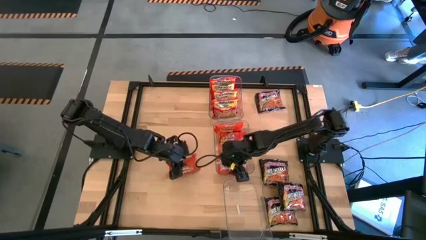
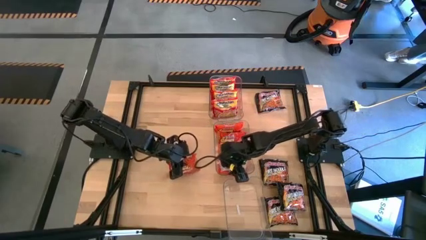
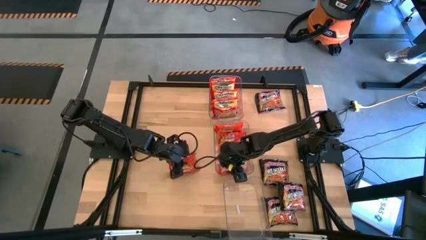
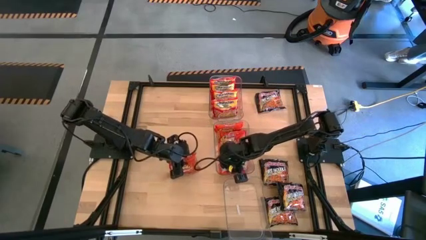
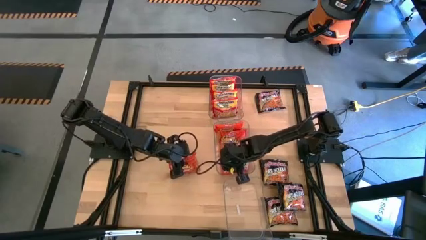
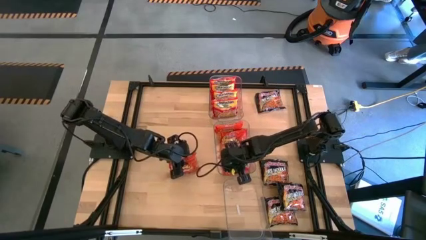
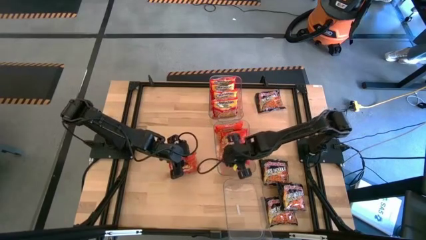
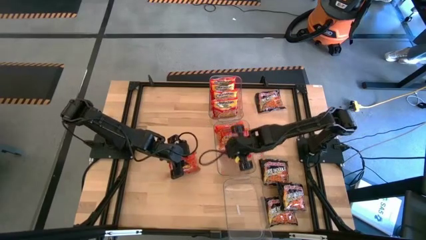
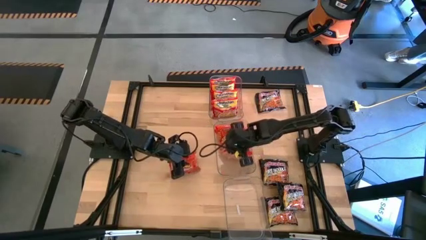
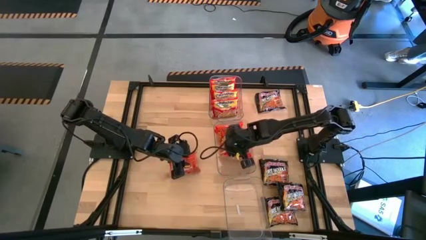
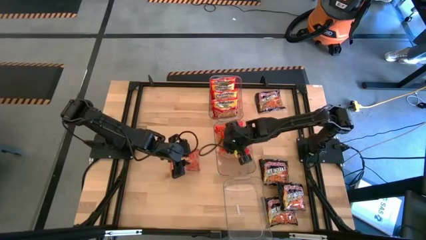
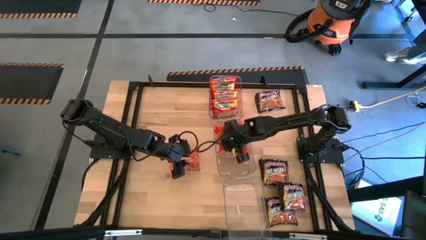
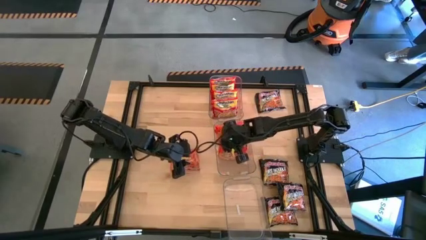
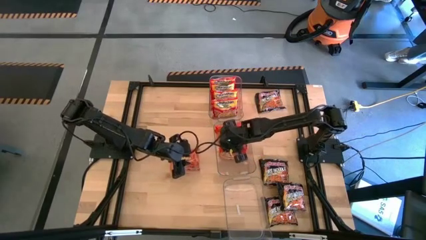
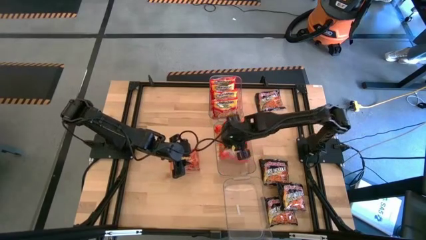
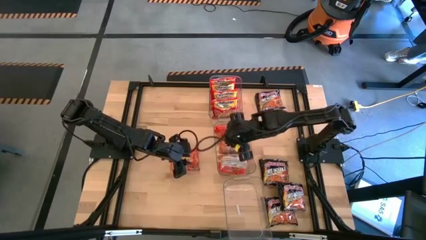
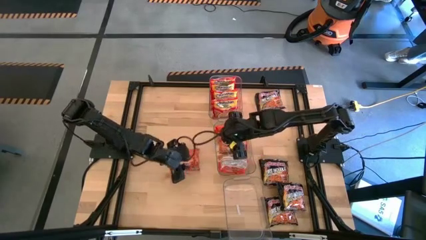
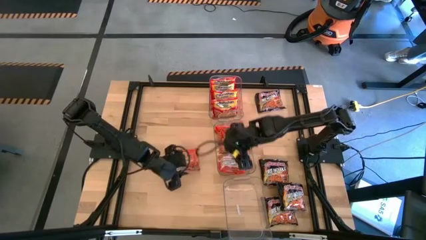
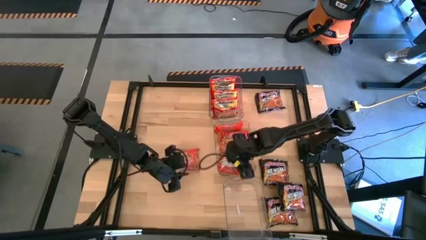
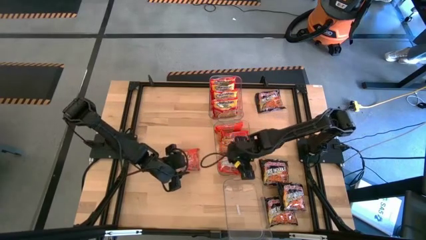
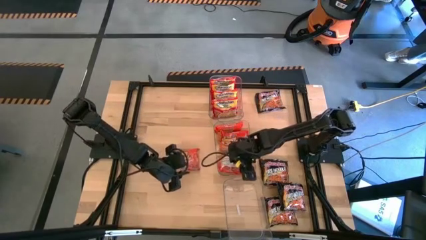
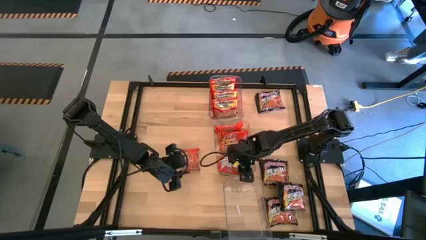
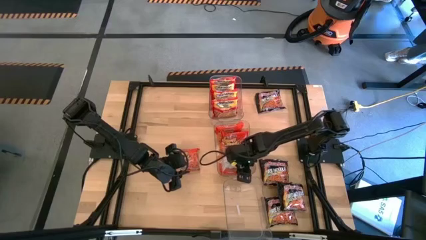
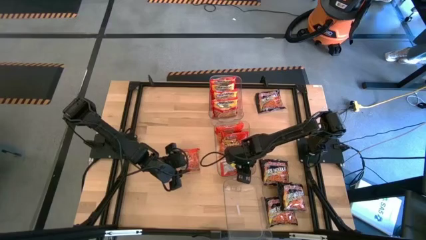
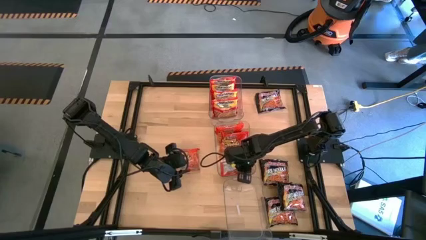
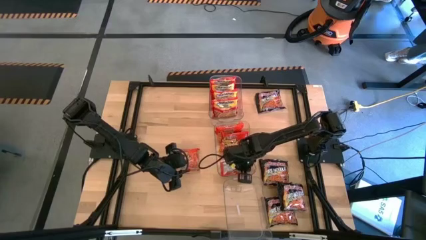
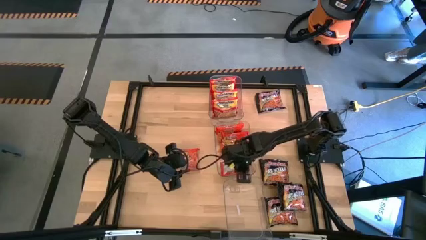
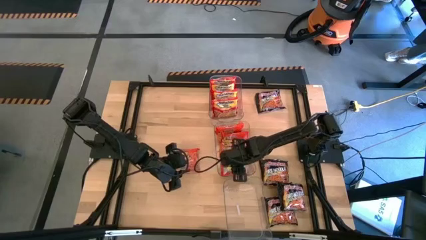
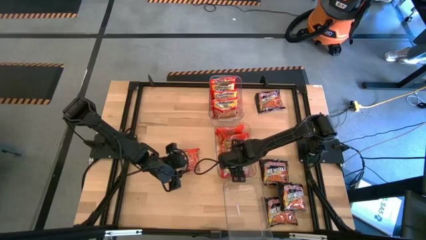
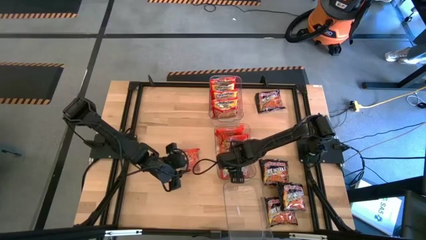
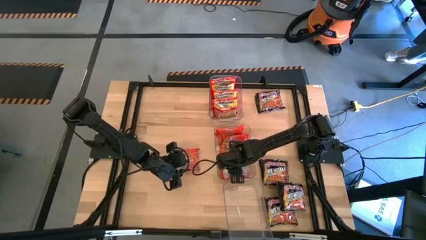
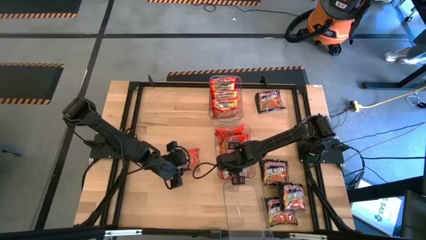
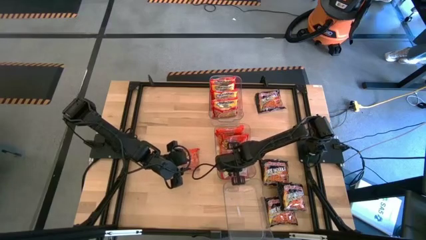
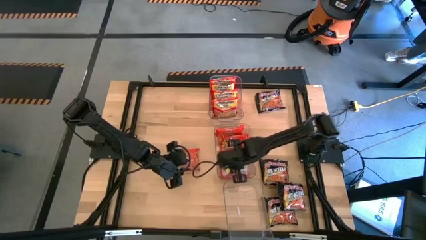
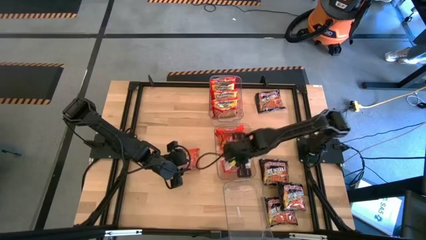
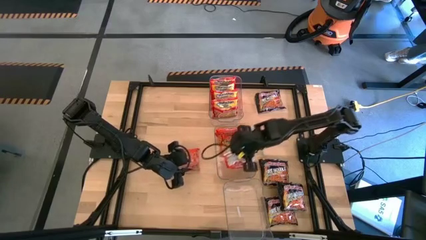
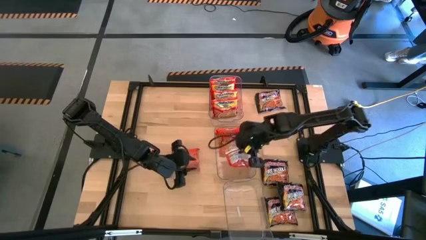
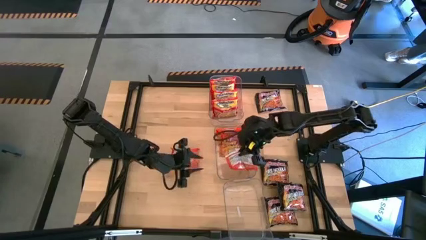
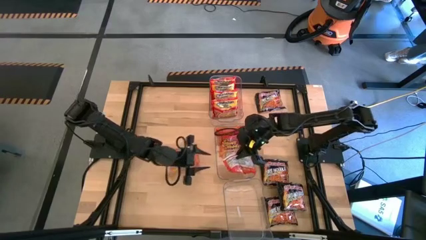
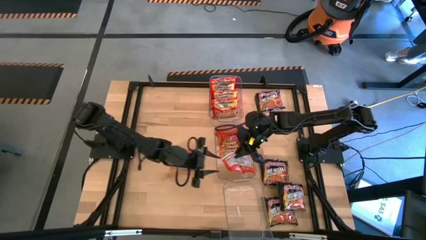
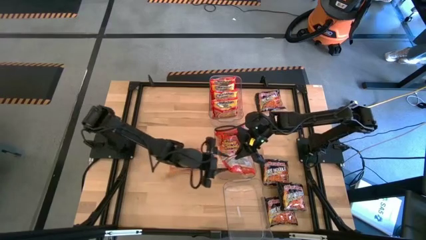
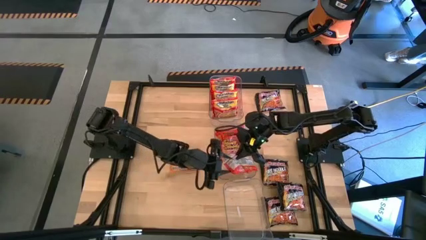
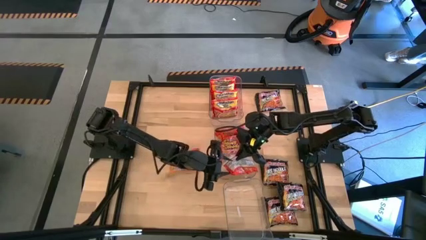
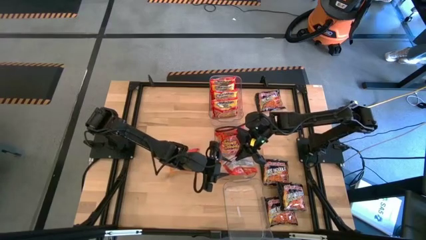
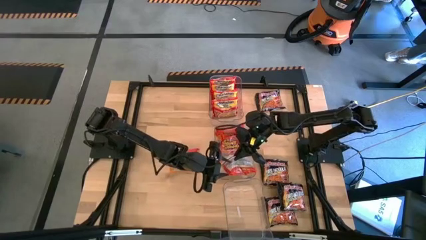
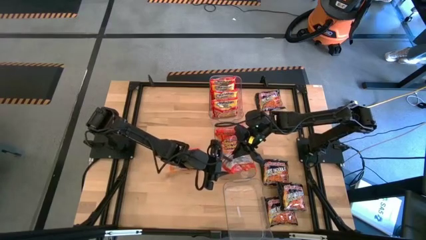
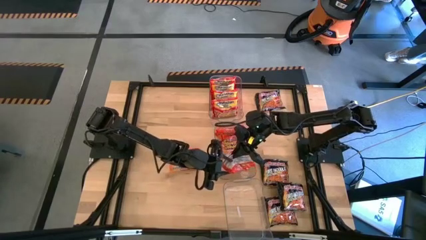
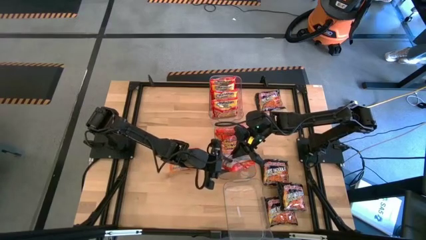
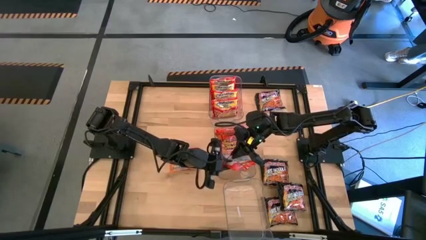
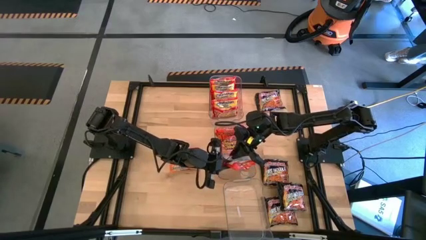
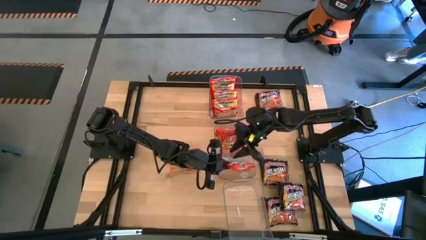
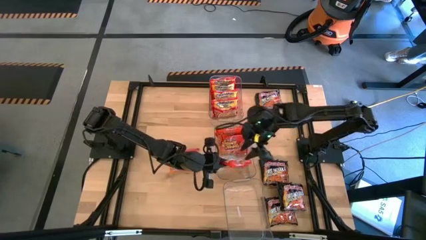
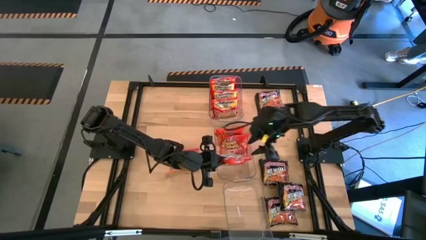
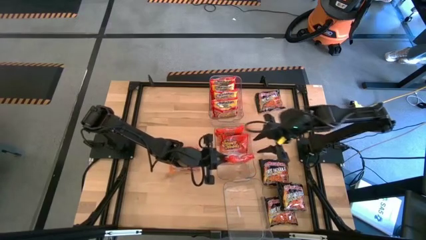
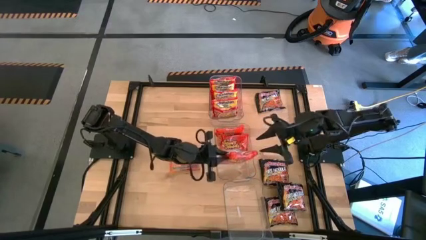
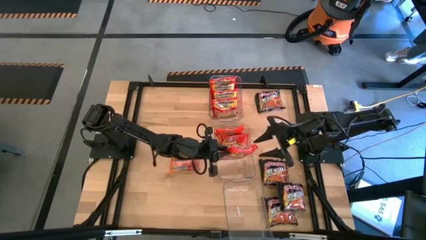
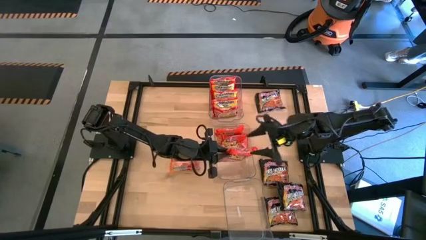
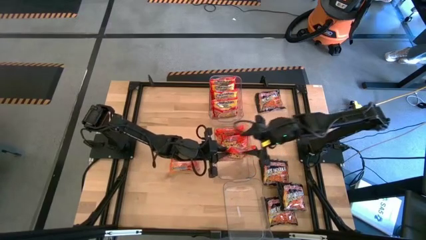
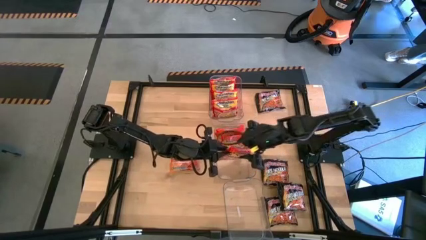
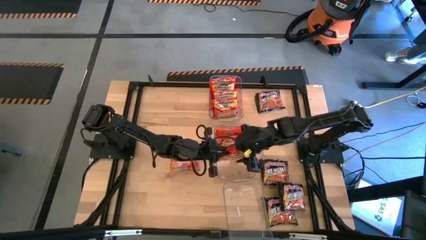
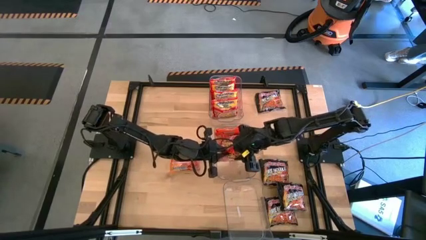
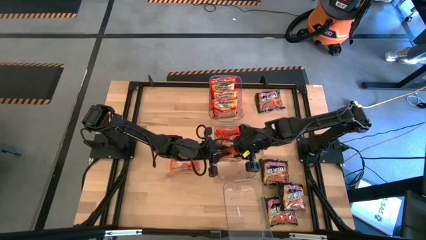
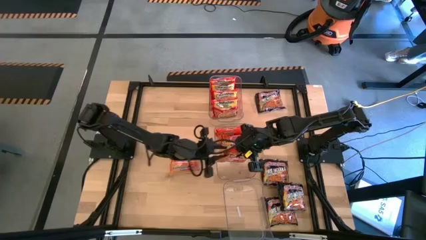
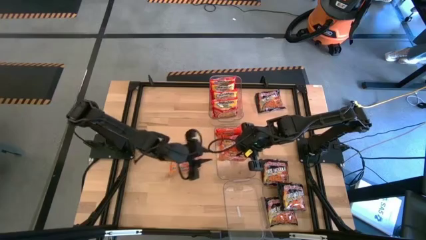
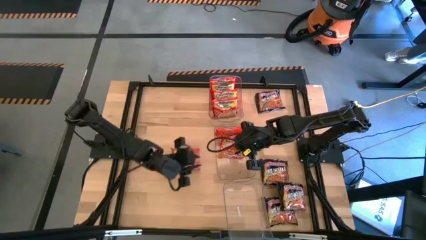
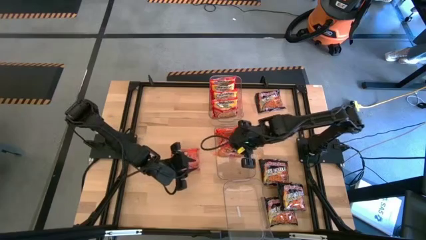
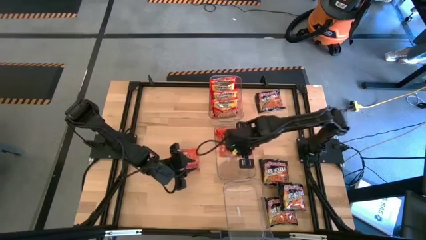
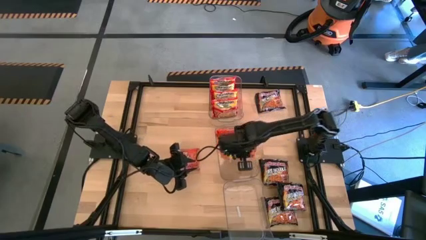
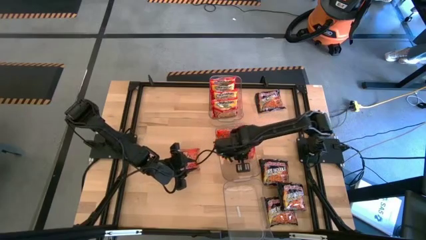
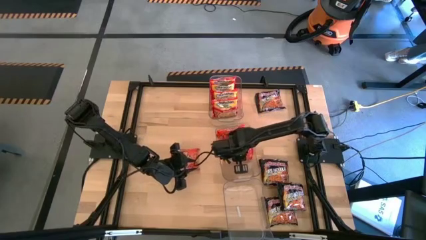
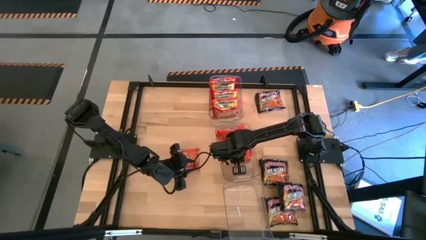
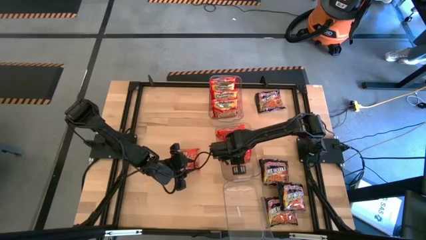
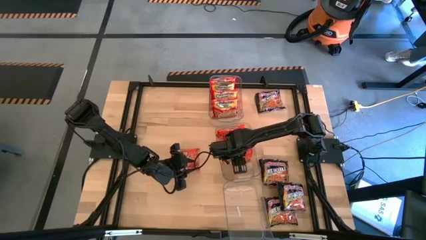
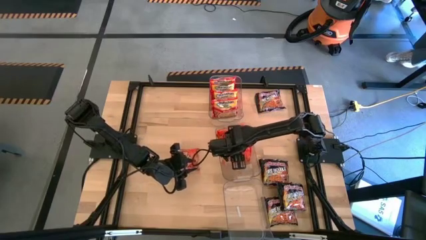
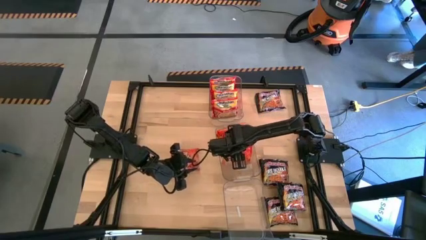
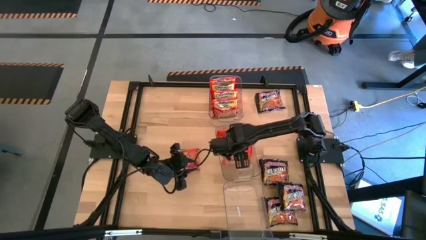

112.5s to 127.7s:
Task: Sort Maruchan noodles
Adjust the orange noodle packs in the bin
